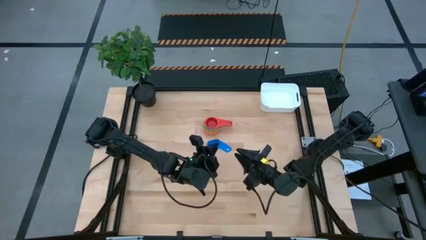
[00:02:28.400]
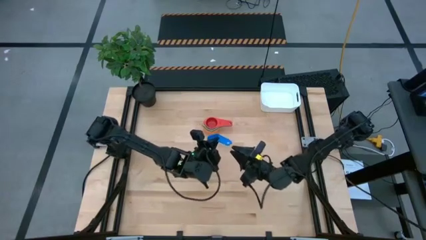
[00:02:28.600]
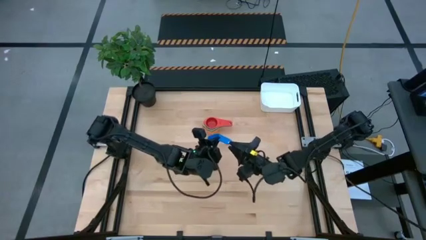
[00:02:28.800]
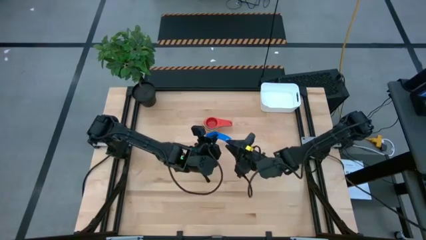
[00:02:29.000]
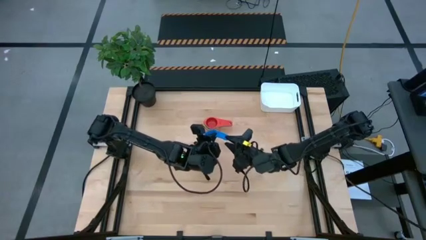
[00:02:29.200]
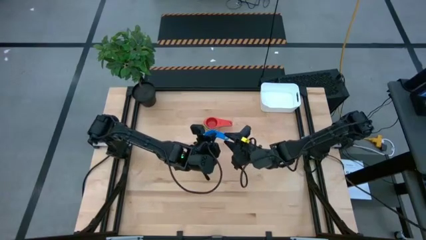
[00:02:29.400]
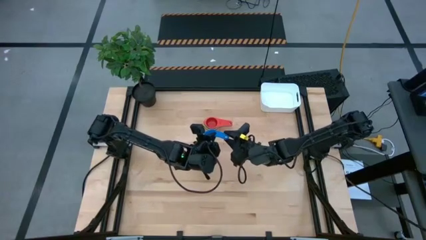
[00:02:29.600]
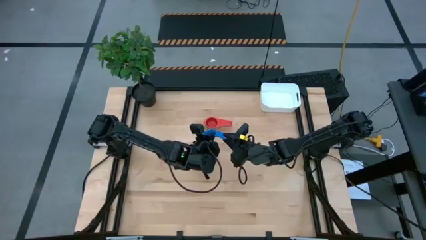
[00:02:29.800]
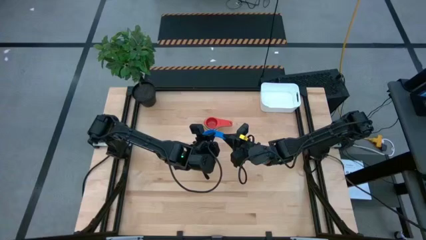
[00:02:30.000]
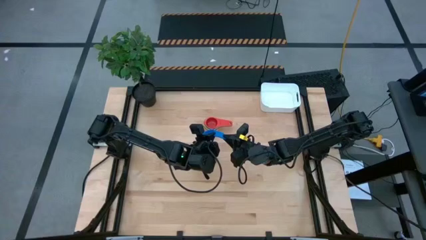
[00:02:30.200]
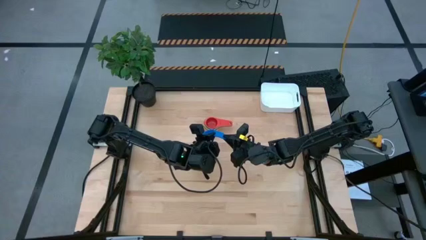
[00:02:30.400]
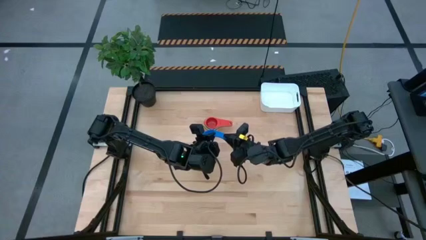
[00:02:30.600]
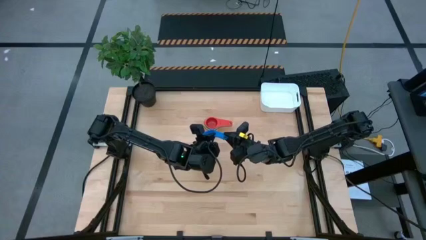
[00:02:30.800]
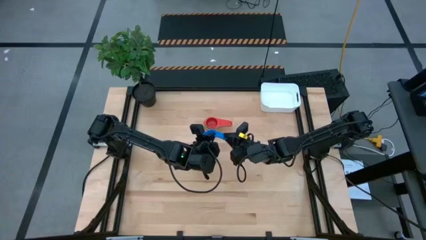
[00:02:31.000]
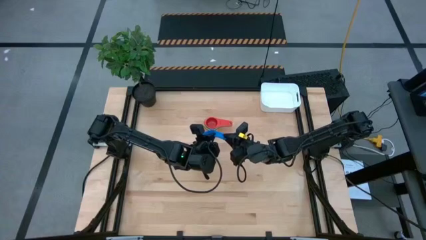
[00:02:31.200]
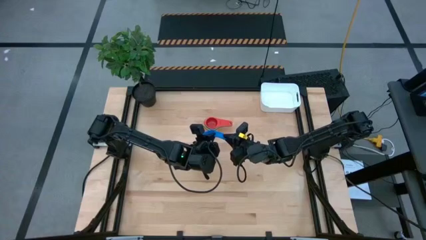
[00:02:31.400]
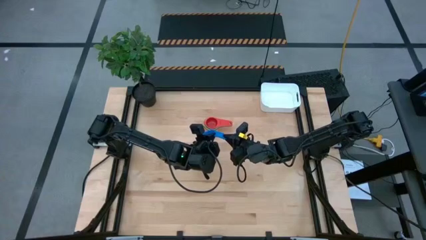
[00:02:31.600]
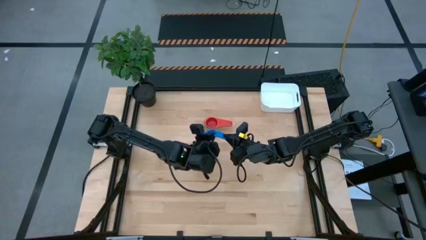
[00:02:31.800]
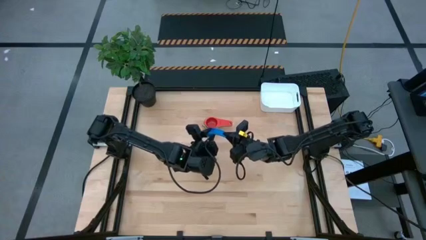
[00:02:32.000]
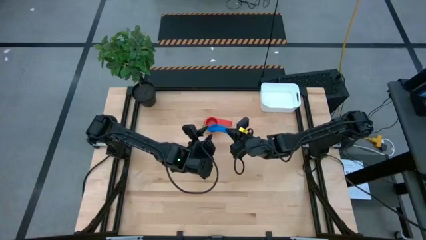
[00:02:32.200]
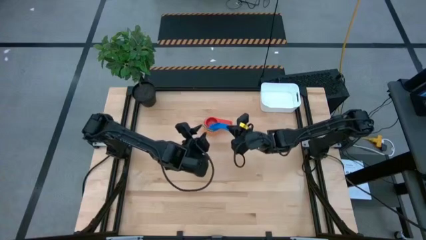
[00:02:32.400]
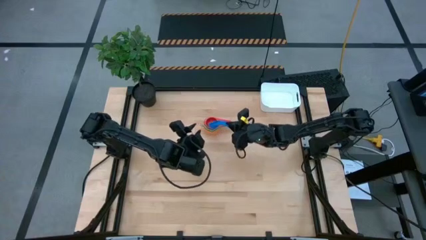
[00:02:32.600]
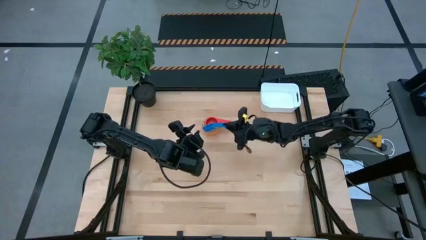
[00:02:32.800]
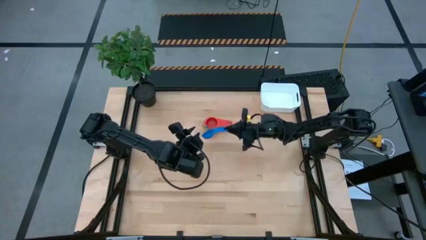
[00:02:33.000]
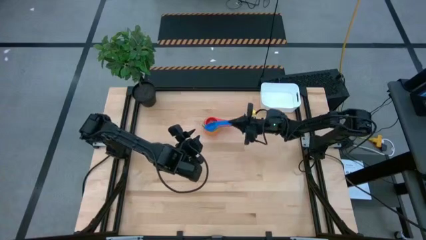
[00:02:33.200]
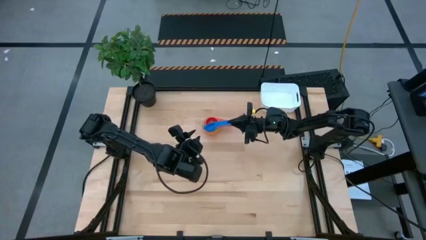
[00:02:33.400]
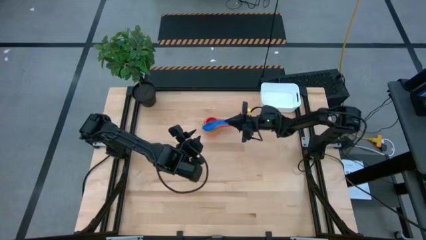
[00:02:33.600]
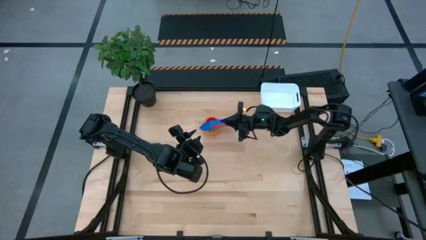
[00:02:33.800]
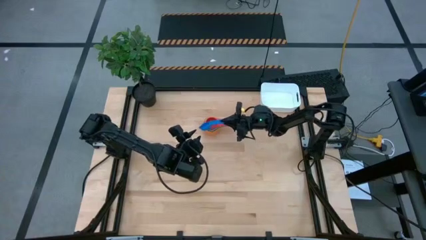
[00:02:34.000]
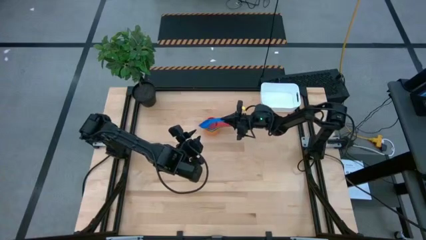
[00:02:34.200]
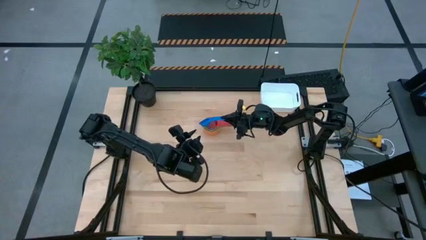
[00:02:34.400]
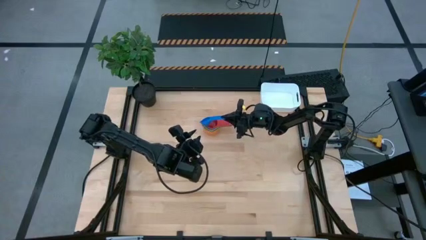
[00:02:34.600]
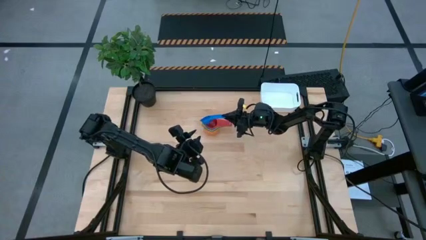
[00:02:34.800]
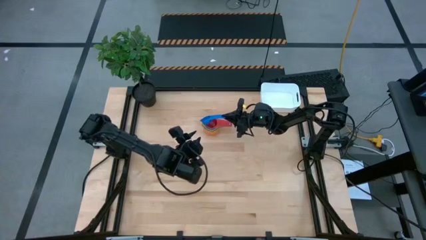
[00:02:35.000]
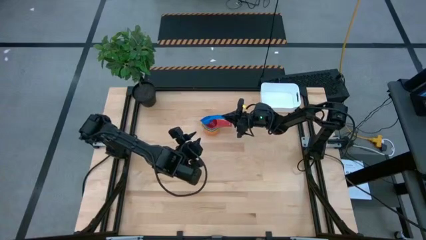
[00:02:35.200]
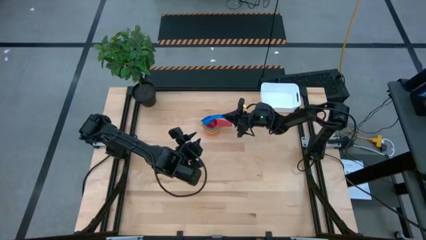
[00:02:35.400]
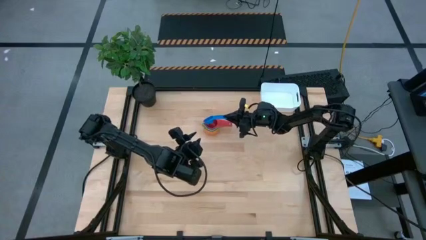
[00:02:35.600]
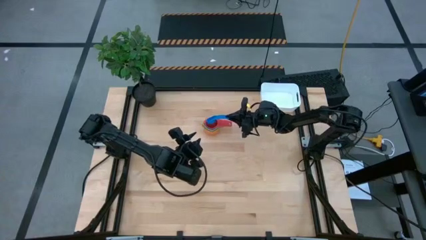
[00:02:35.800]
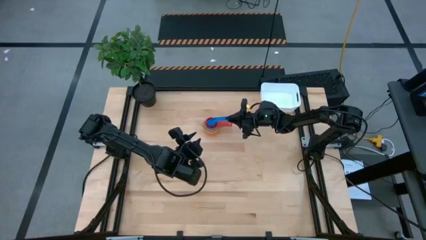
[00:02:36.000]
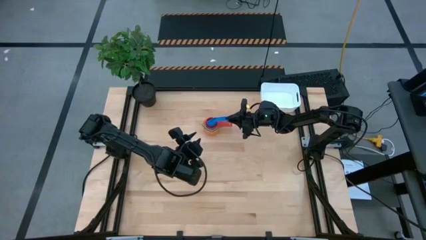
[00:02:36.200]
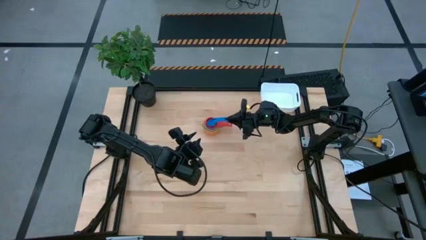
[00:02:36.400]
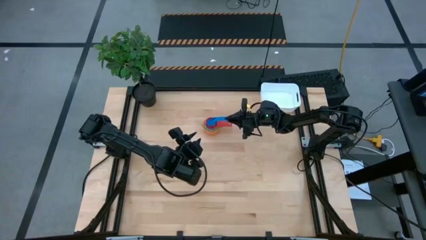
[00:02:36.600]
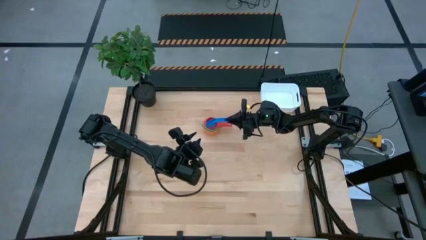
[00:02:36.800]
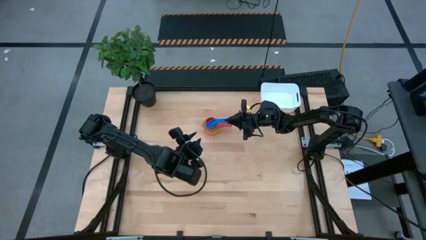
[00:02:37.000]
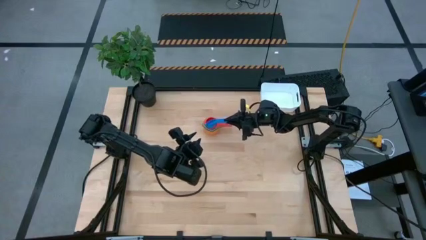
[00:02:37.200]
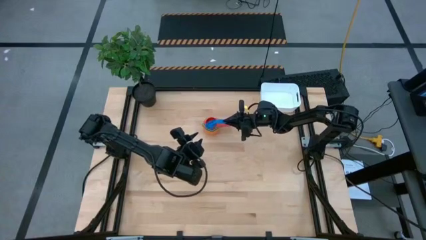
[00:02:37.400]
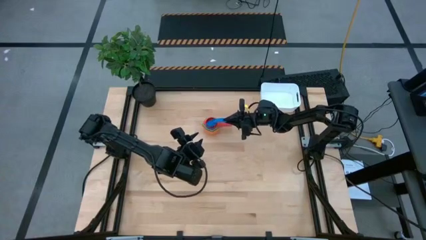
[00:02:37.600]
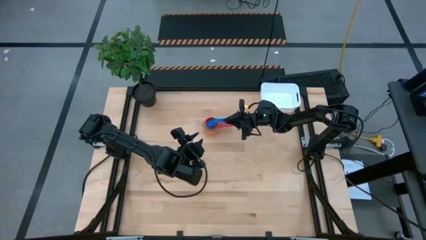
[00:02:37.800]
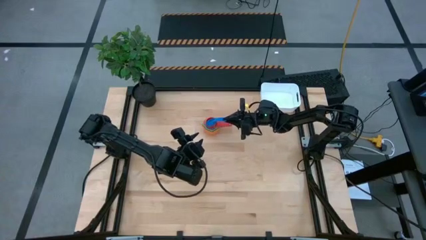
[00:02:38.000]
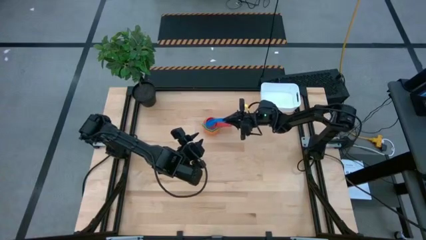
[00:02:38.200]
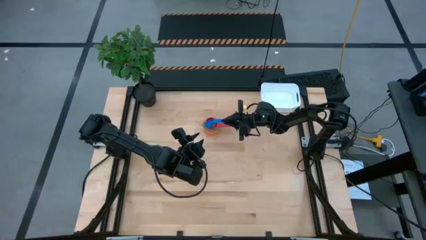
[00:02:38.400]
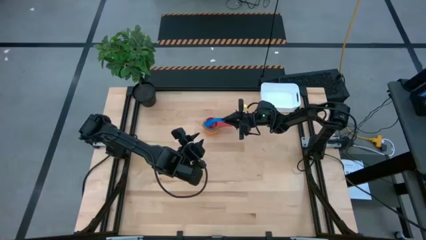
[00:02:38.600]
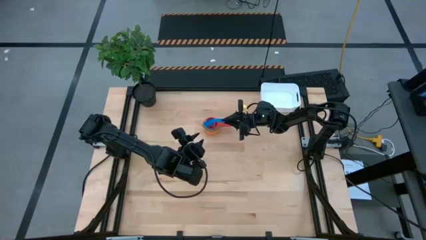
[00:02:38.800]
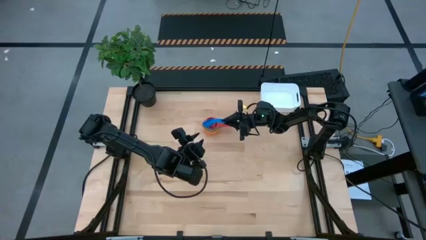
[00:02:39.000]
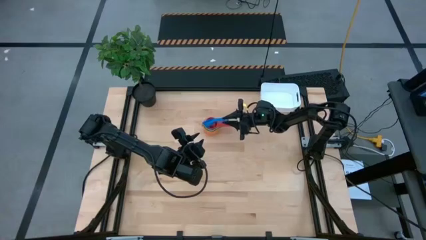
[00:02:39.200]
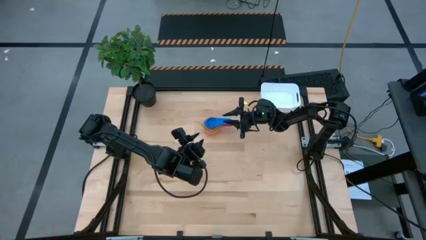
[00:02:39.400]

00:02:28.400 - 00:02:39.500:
Task: Nest measuring cups in basket
Stack the blue measuring cup into the red measuring cup
